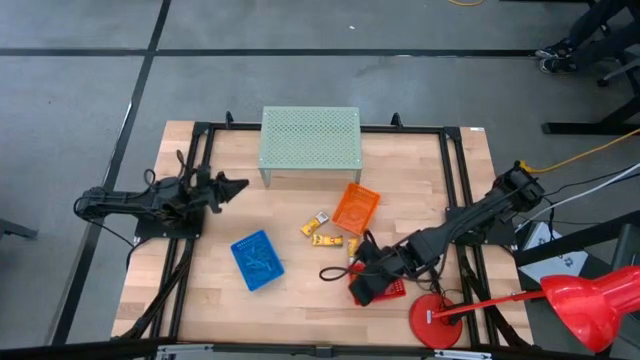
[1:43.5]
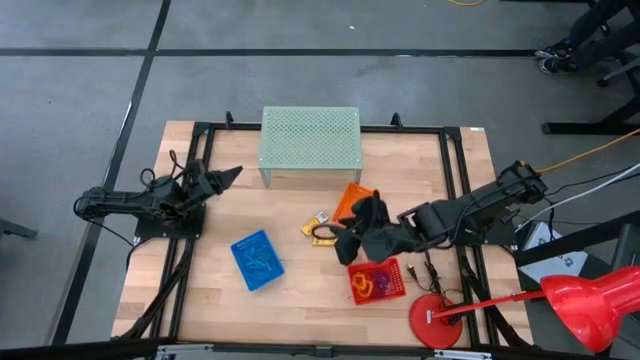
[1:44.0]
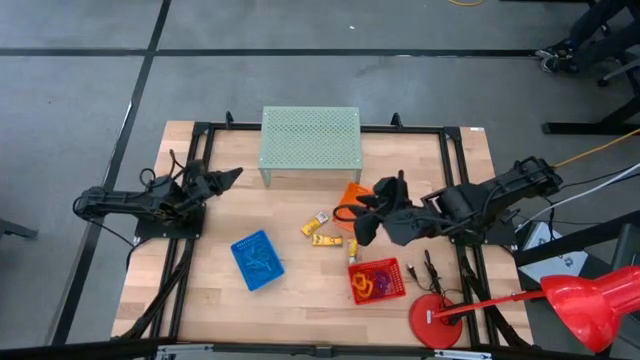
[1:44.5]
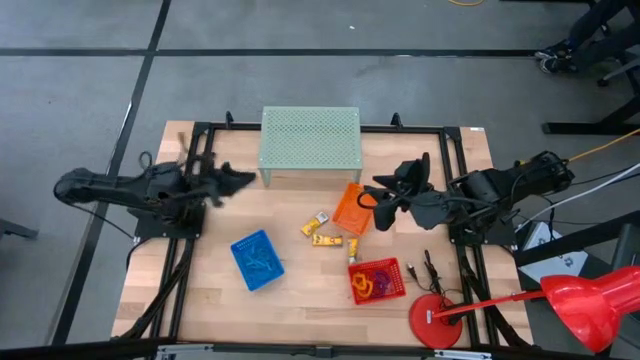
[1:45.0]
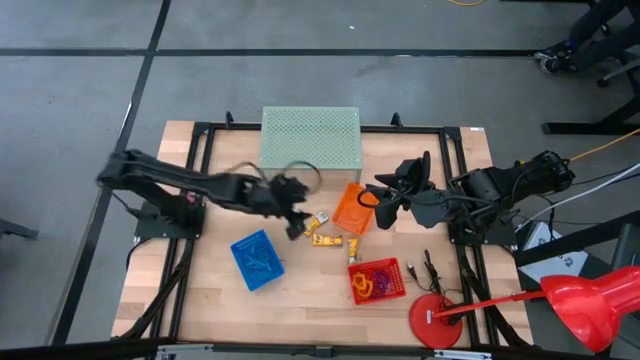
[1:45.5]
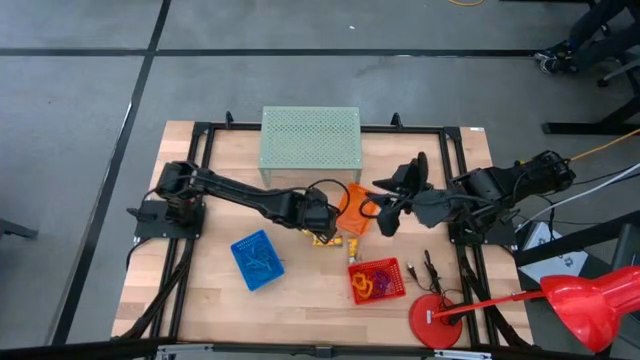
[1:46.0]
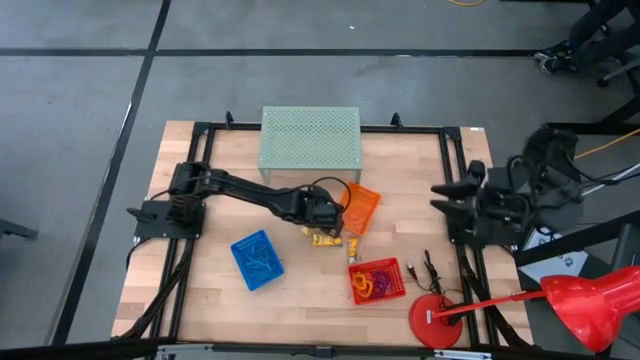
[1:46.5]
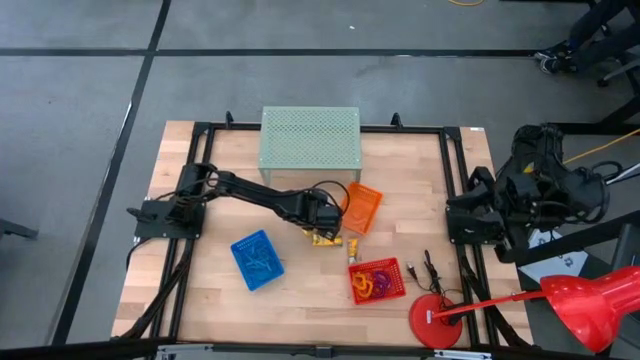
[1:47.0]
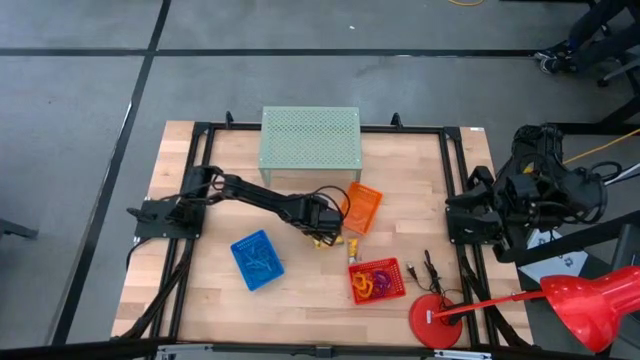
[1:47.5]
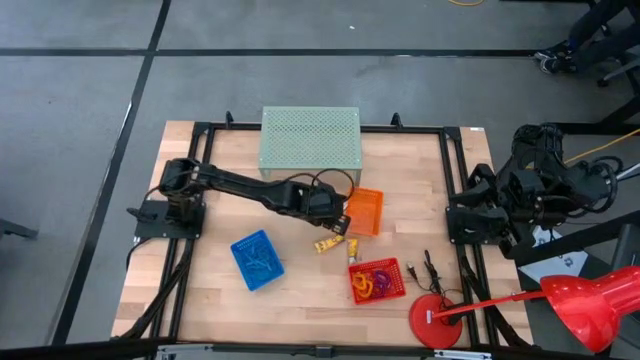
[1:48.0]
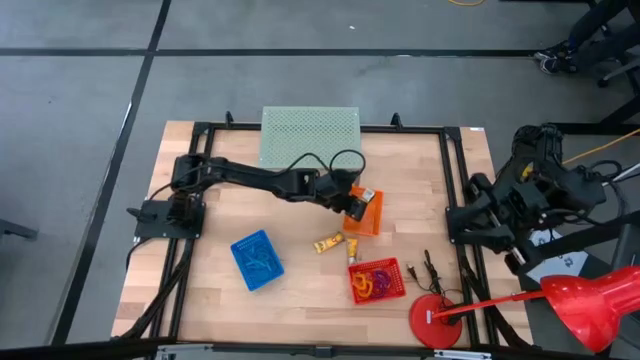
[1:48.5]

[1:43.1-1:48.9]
Task: Pick & Place Office Desk Supplies
Put the yellow crayon box into the orange bin

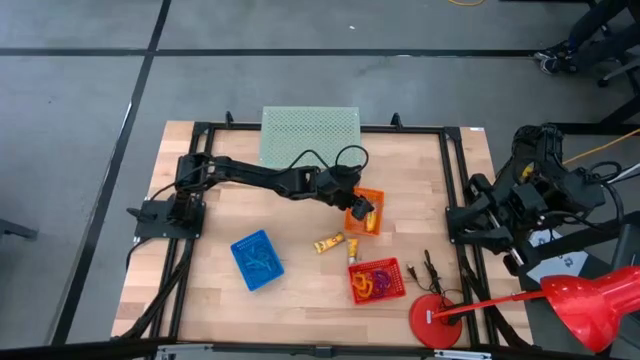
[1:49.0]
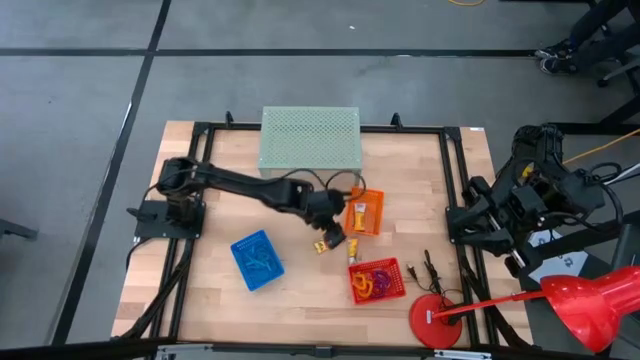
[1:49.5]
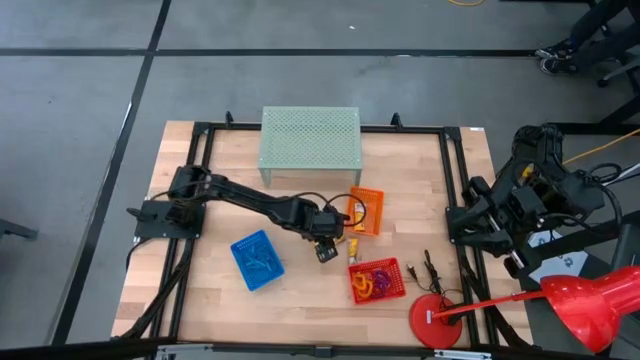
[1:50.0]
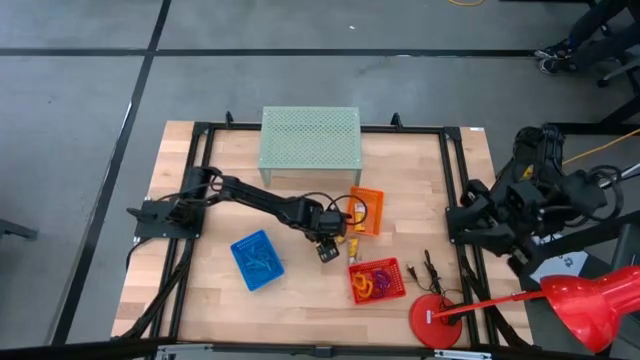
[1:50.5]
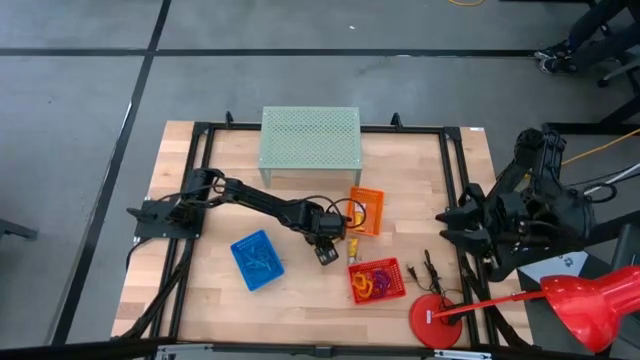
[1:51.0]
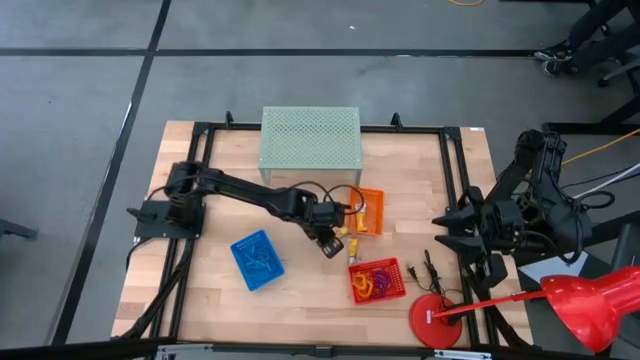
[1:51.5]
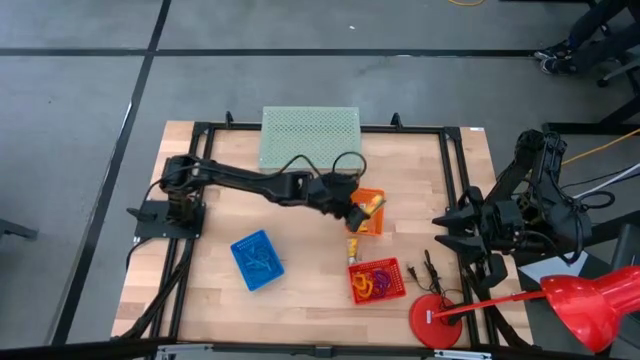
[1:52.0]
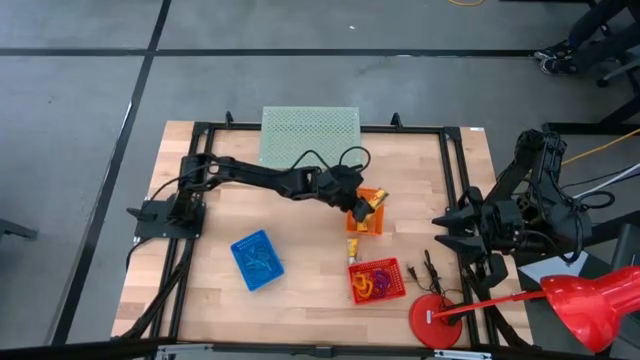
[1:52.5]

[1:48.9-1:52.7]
Put the yellow crayon box into the orange bin

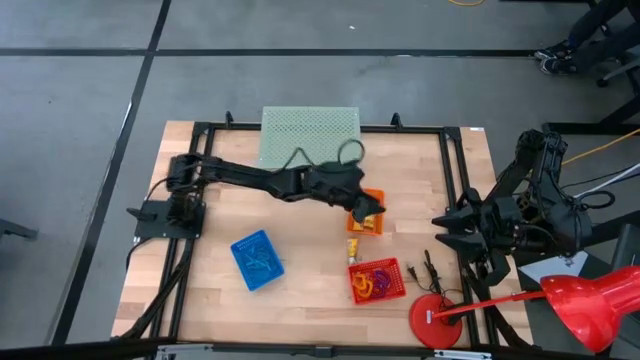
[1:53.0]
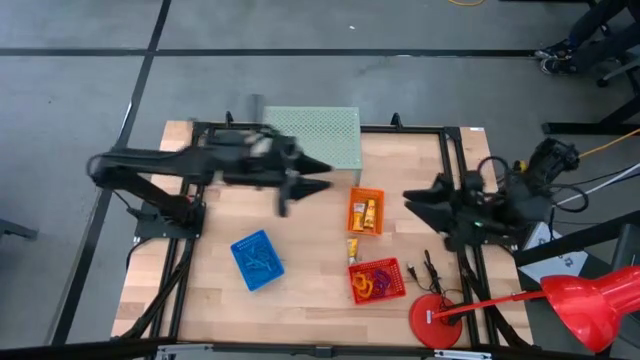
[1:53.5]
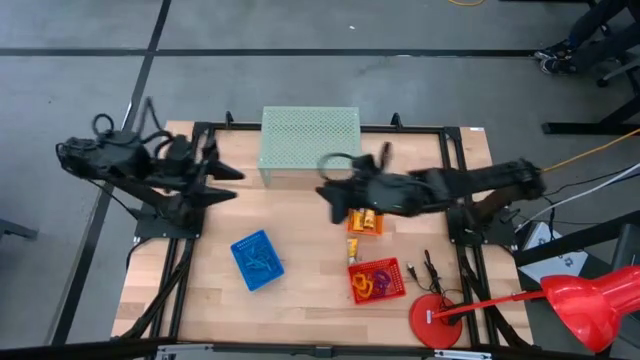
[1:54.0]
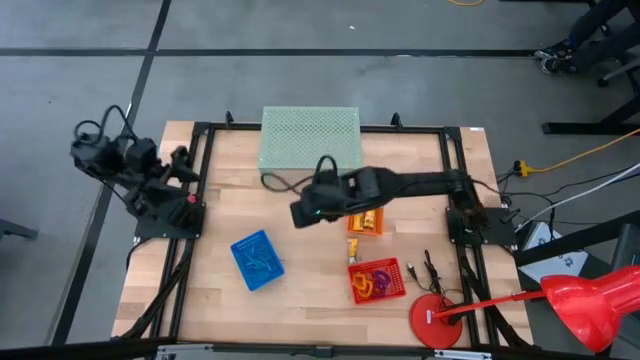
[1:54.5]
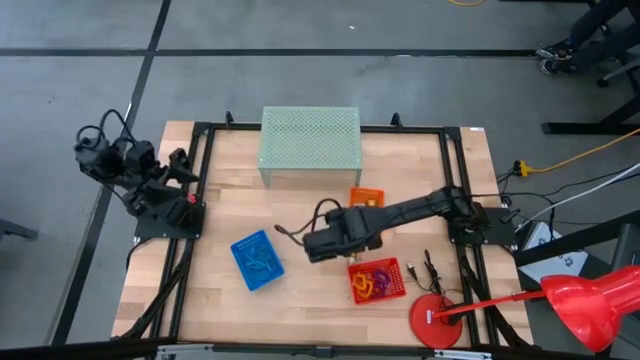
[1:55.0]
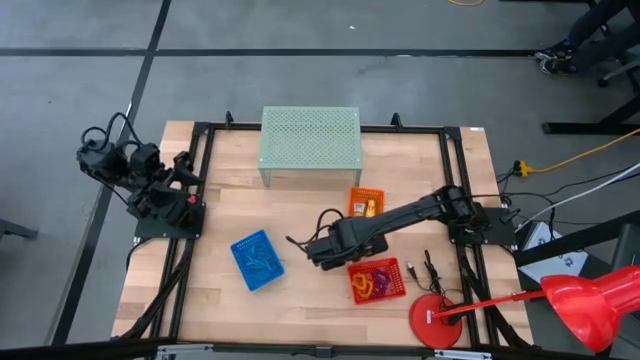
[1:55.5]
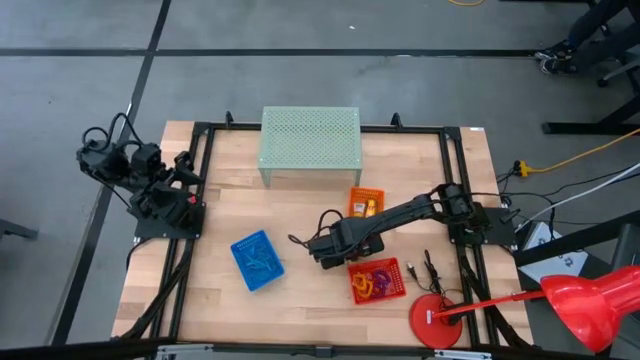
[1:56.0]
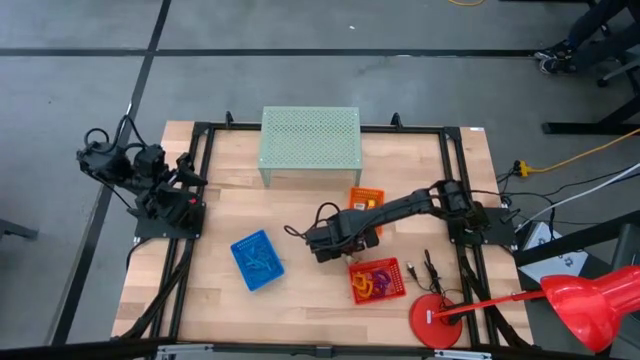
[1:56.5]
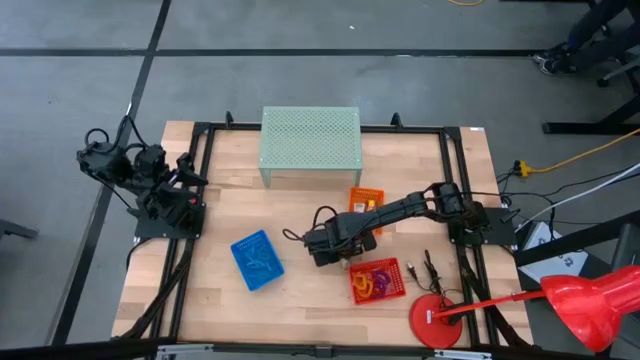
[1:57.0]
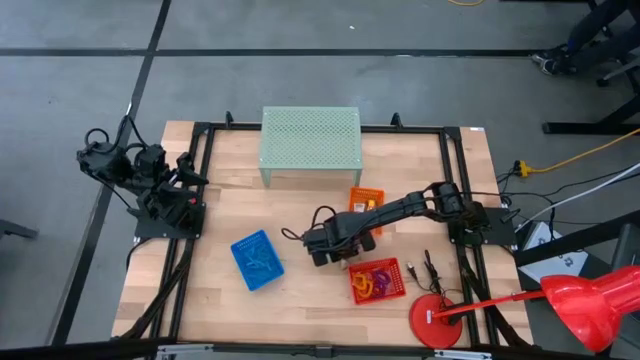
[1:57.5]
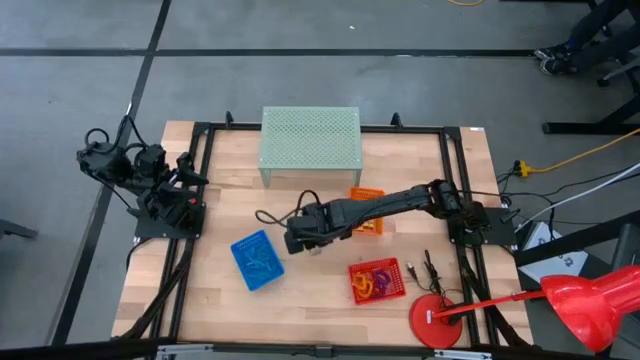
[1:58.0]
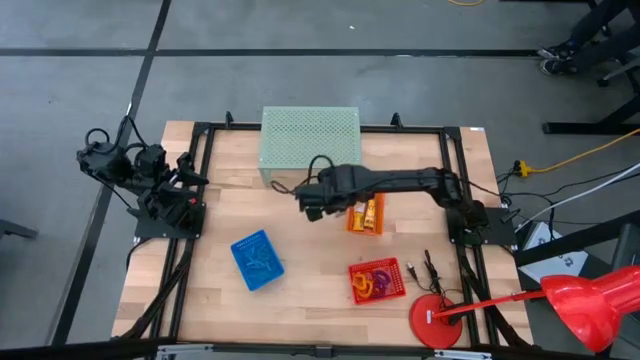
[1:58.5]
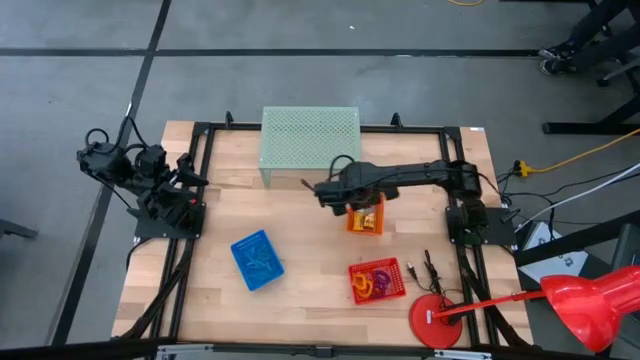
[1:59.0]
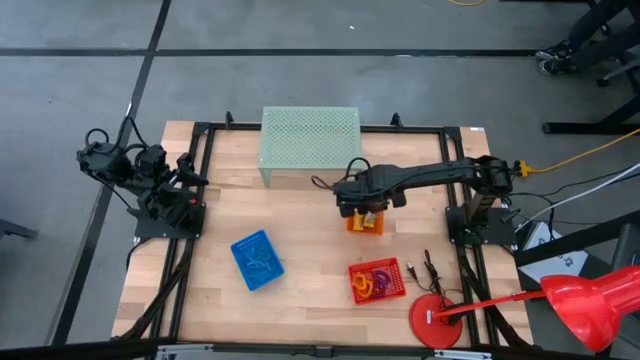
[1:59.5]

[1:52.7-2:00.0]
Put the yellow crayon box into the orange bin

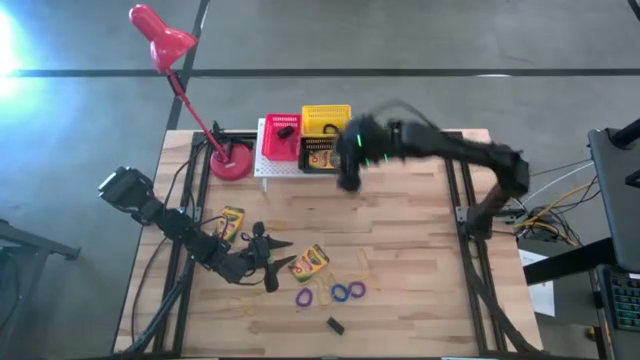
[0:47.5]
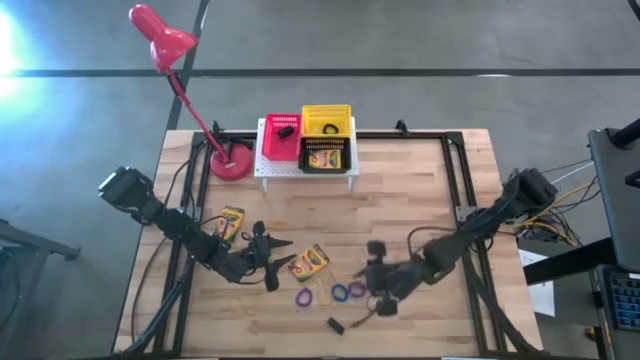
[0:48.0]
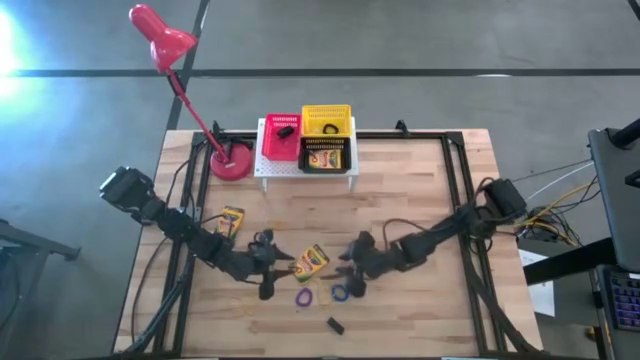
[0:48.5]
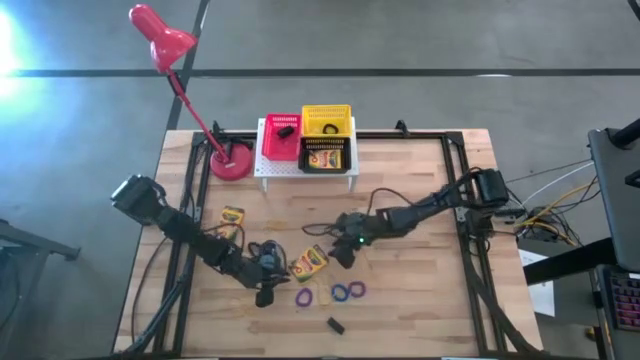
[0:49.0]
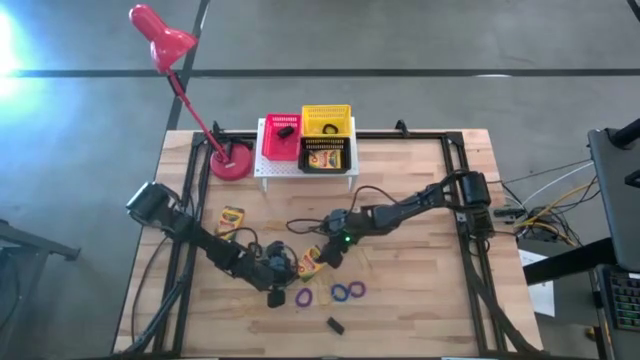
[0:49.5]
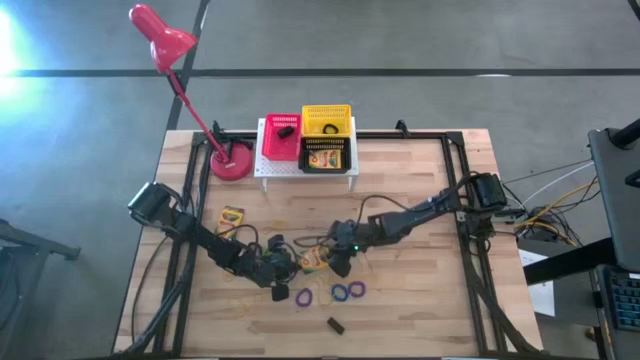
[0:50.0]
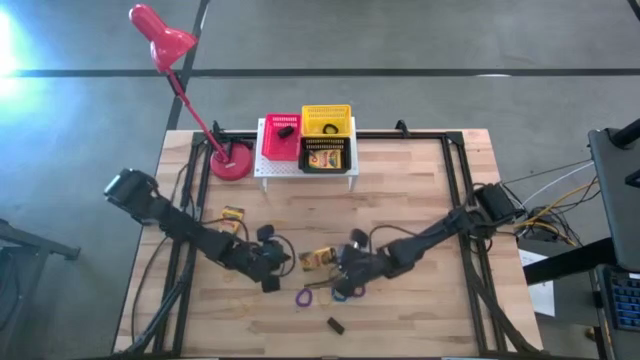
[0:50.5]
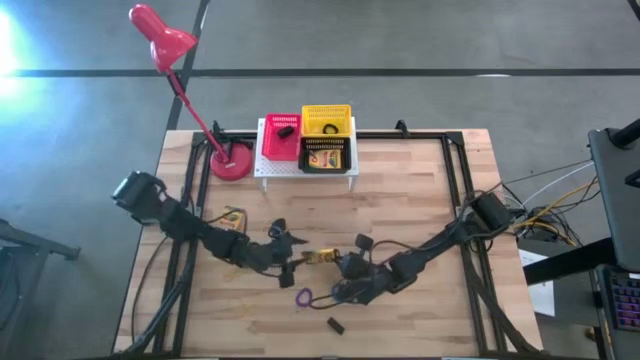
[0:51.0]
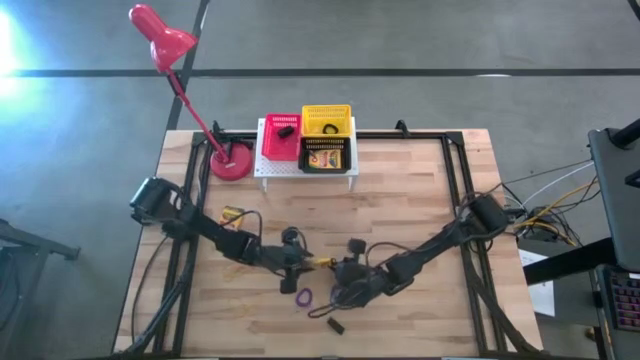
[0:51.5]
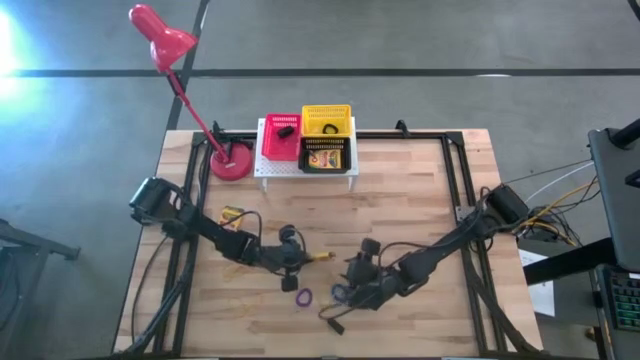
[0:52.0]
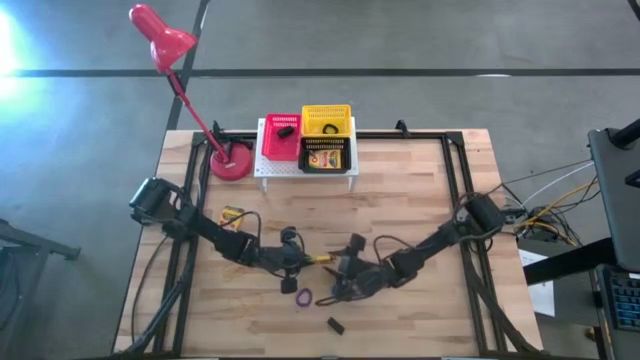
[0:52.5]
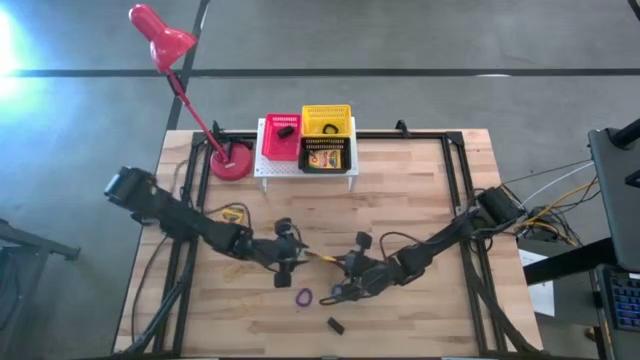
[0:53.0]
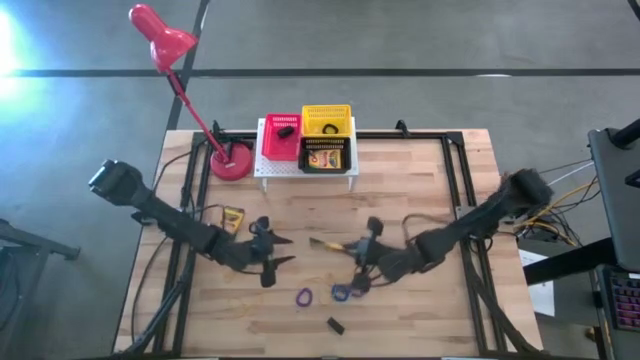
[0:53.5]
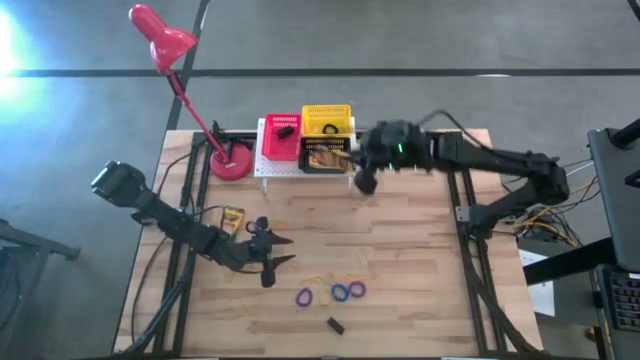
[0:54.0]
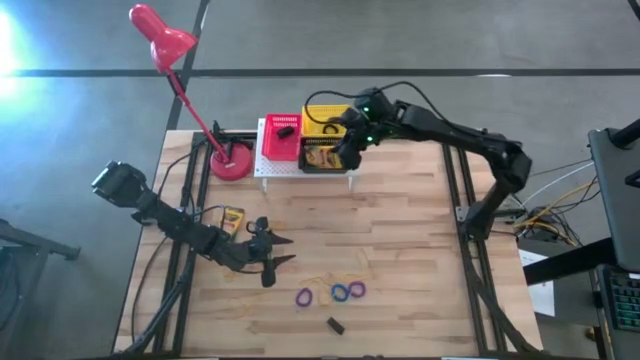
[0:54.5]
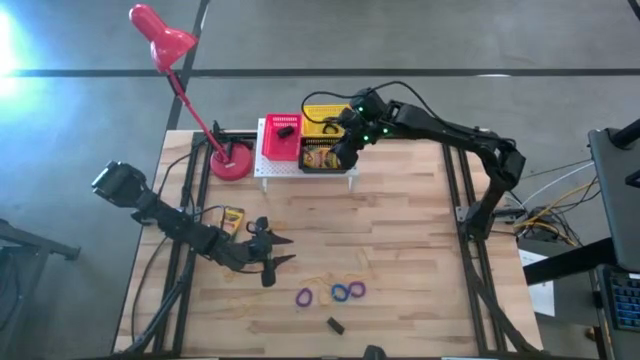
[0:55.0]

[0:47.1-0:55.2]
Task: Pick & Place Office Desk Supplies
Put the right crayon box into the black bin on the shelf
